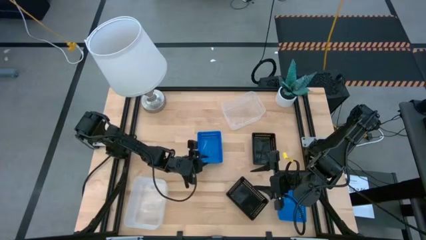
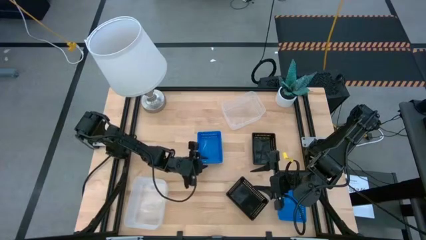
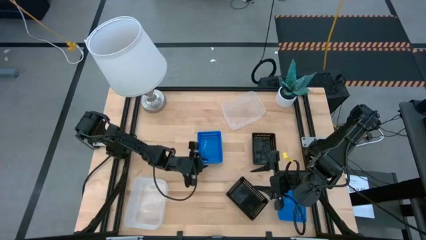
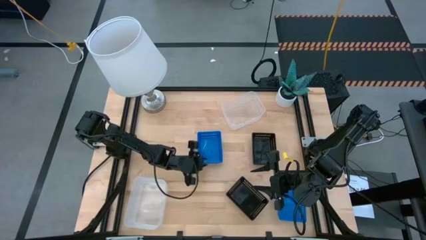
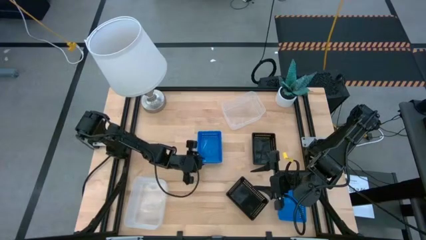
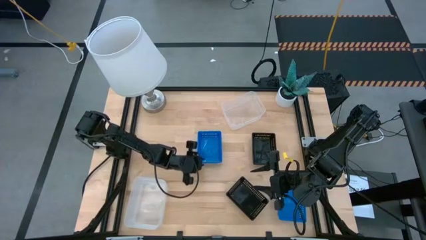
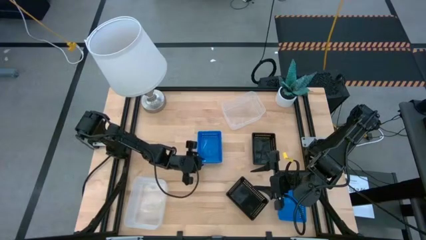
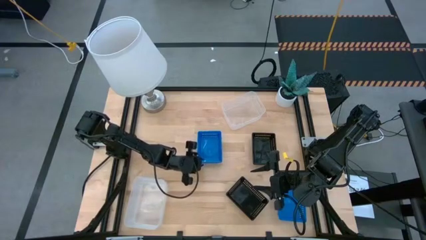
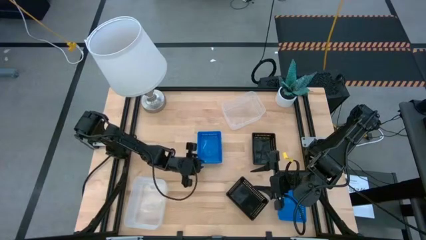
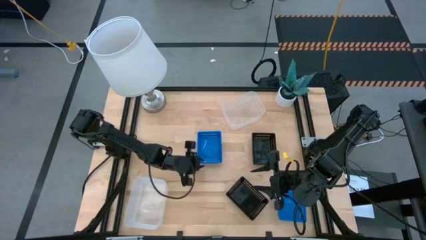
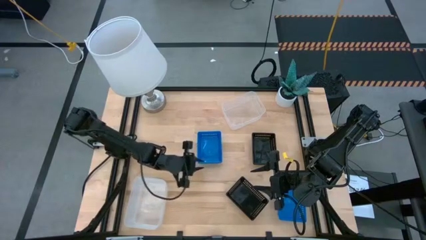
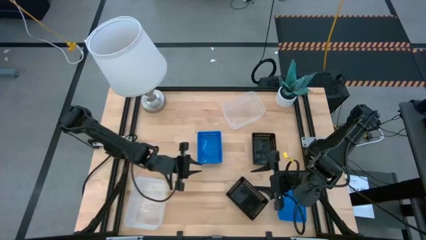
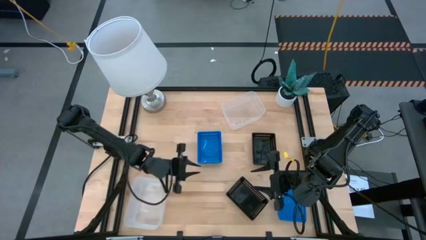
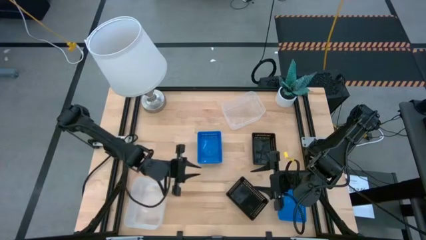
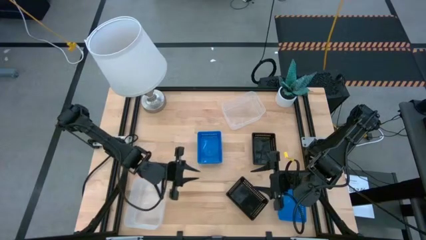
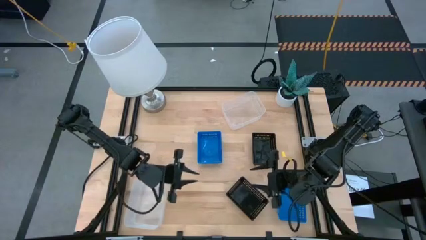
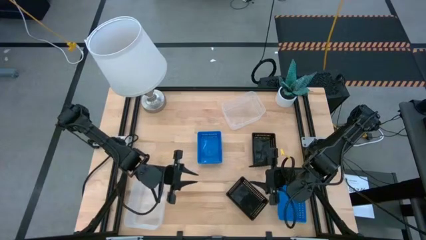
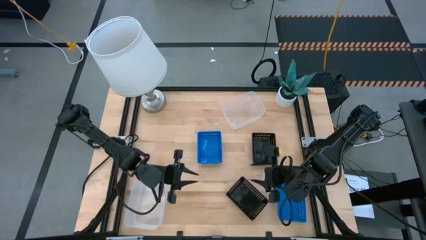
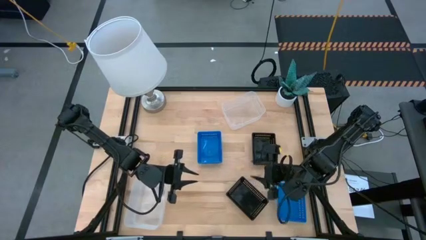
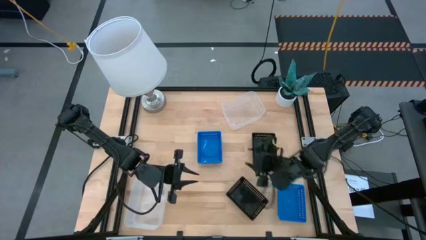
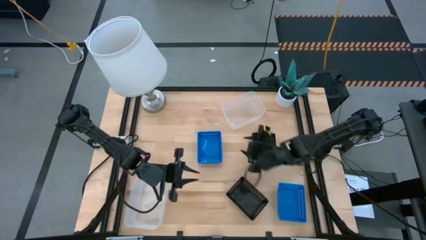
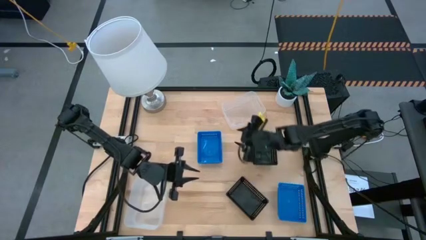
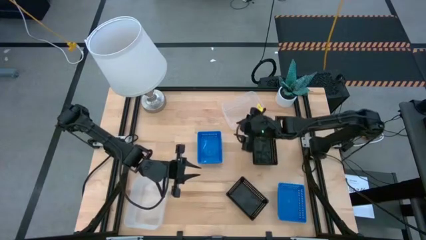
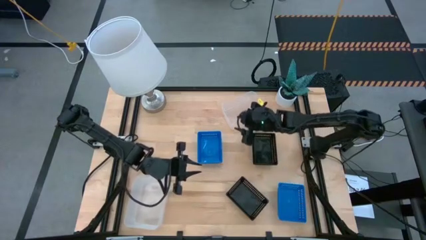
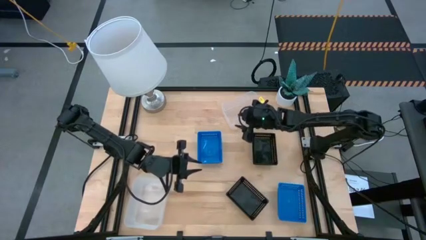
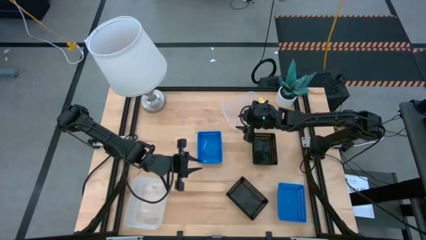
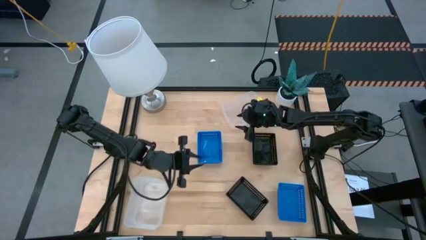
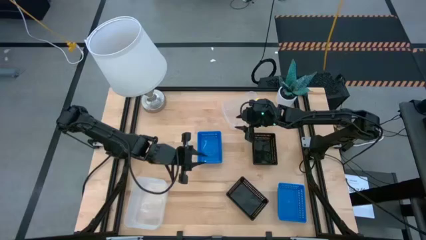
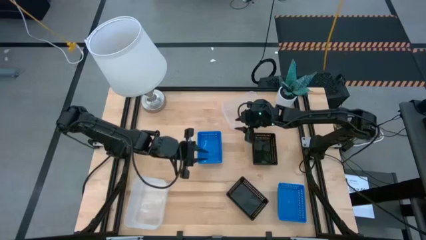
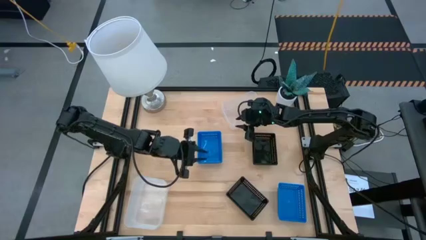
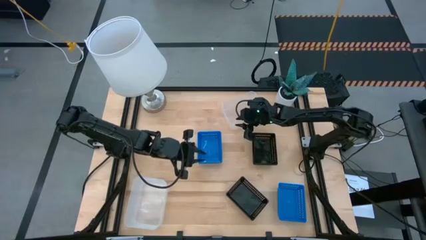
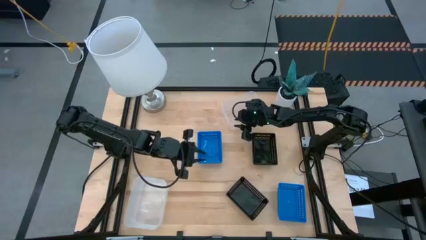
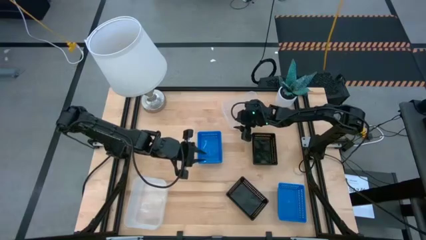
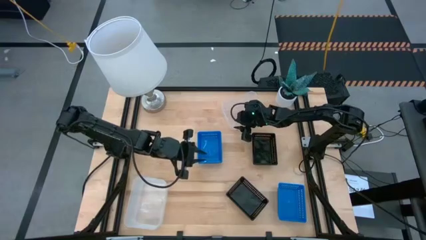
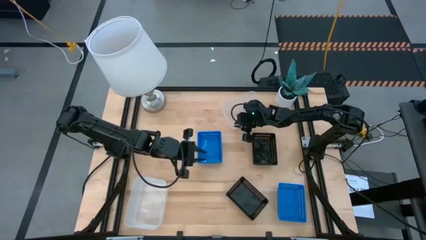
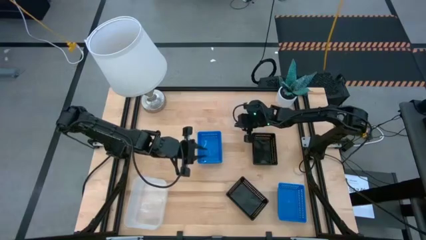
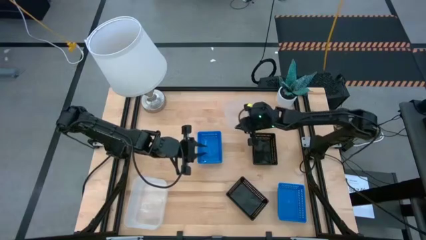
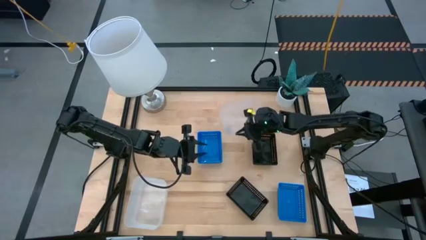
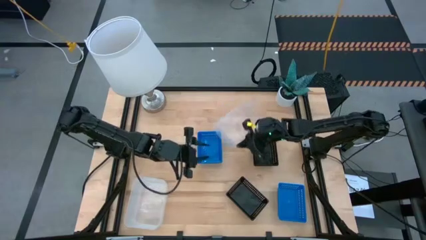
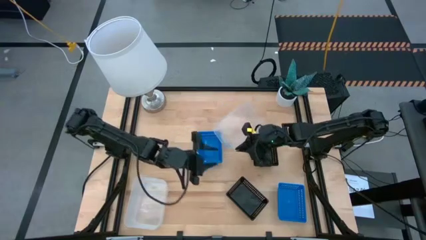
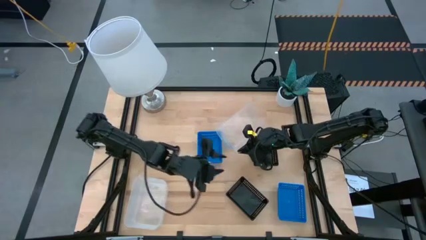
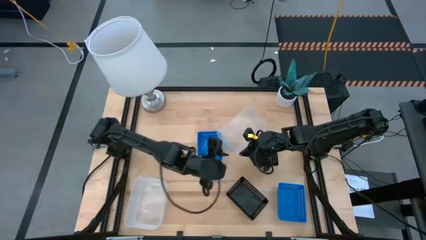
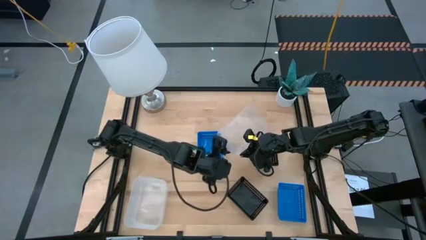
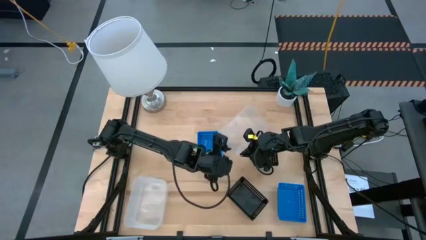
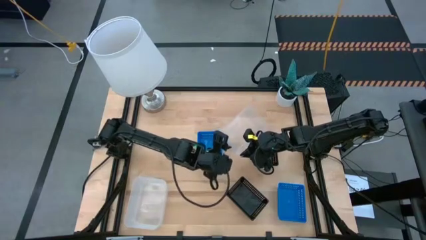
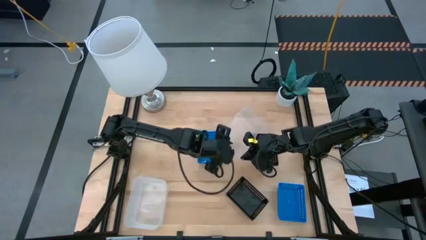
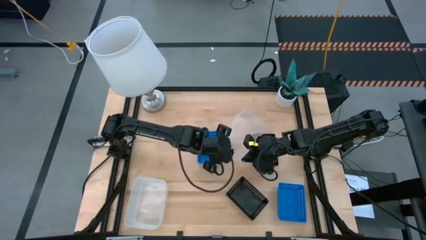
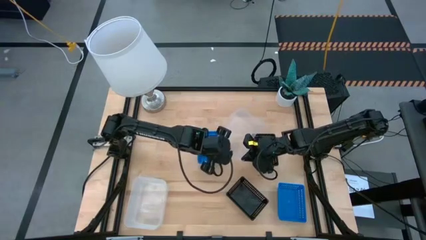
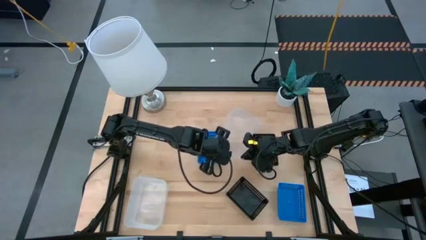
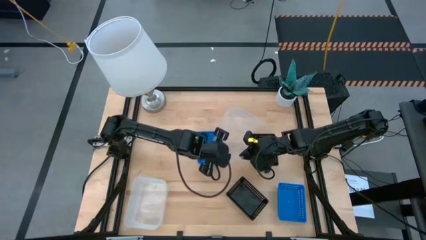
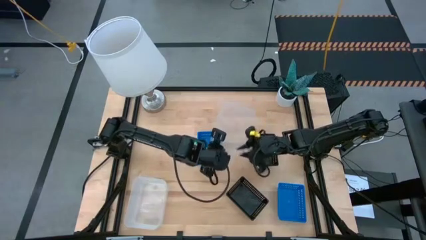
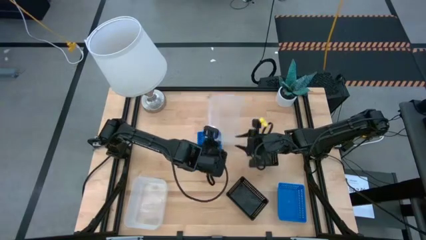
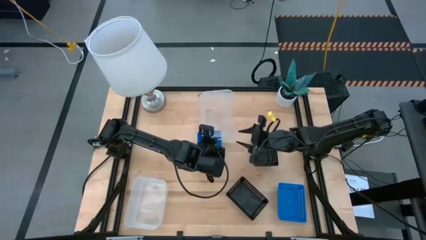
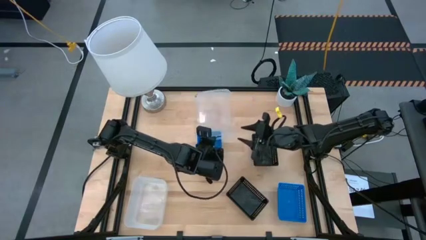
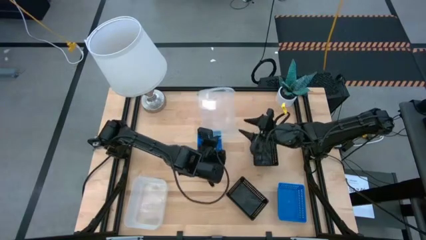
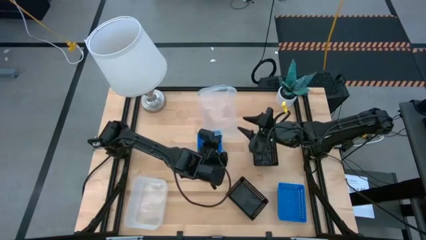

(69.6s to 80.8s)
Stack the top transparent bin on the bottom transparent bin
